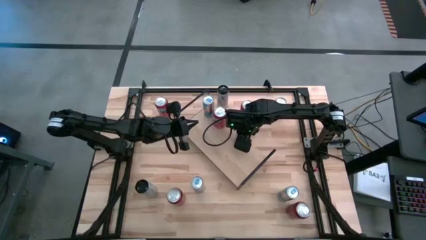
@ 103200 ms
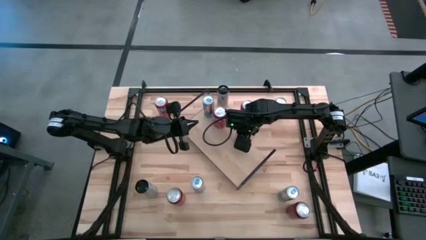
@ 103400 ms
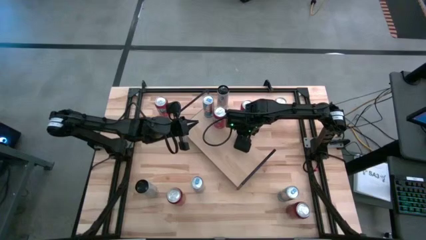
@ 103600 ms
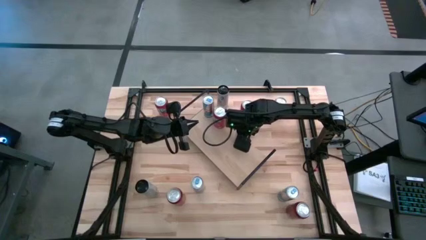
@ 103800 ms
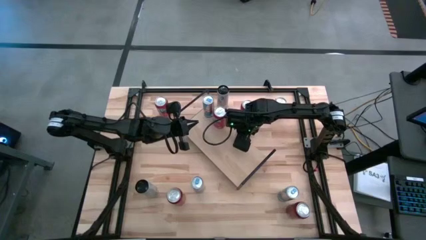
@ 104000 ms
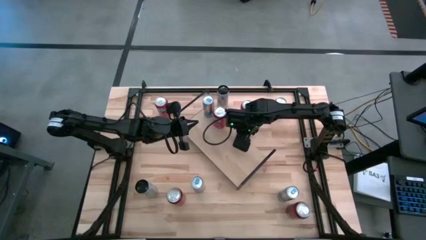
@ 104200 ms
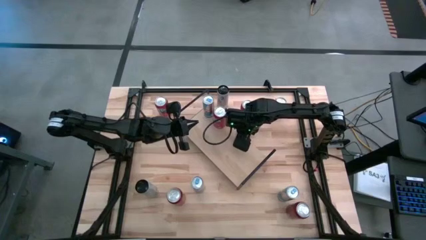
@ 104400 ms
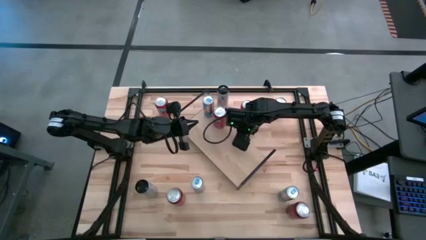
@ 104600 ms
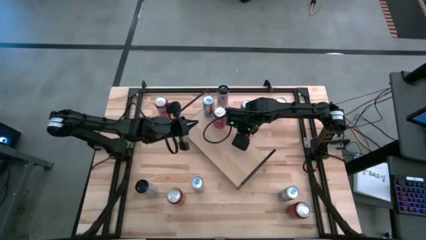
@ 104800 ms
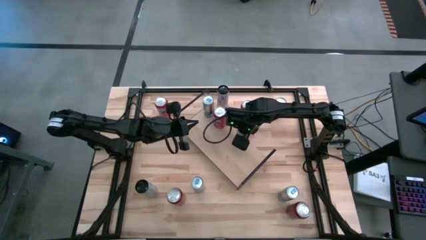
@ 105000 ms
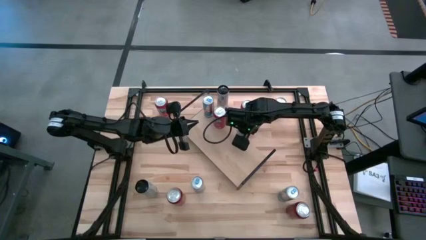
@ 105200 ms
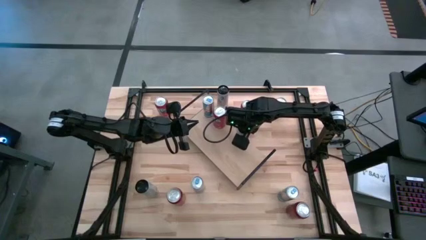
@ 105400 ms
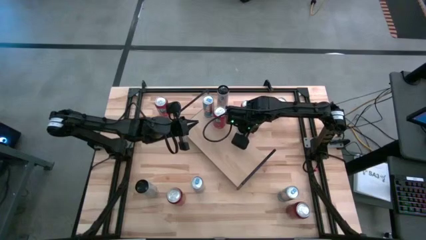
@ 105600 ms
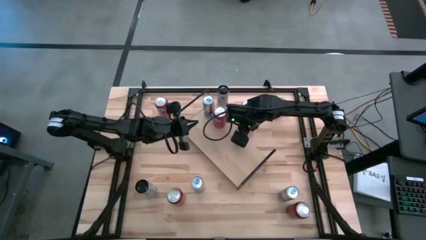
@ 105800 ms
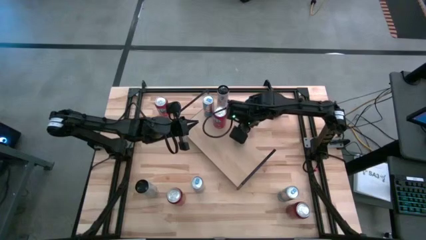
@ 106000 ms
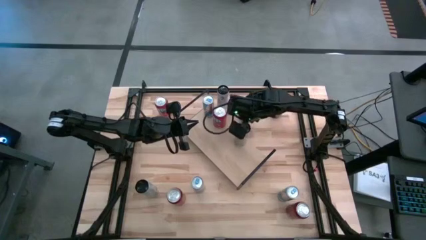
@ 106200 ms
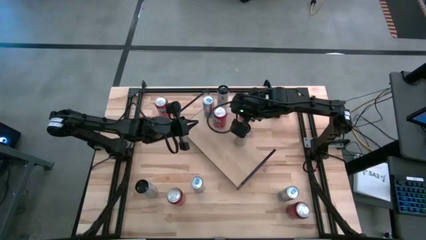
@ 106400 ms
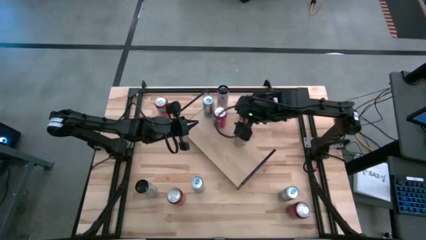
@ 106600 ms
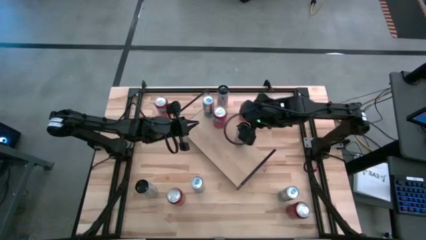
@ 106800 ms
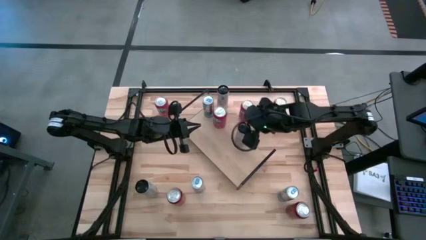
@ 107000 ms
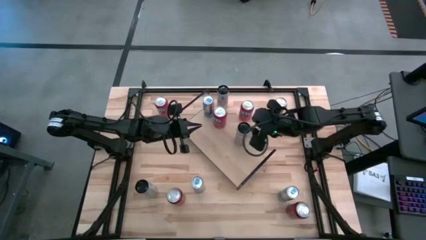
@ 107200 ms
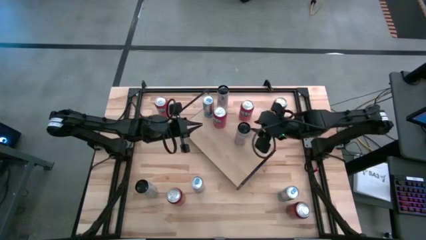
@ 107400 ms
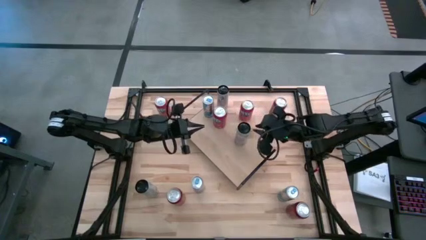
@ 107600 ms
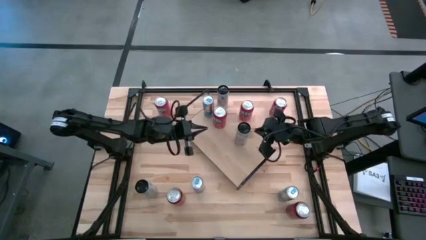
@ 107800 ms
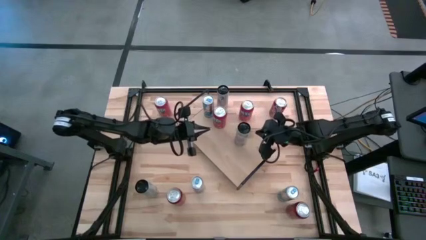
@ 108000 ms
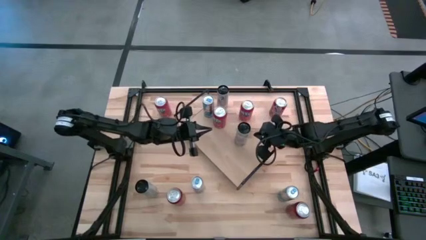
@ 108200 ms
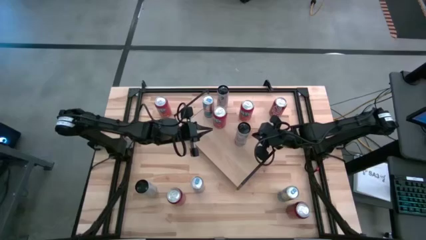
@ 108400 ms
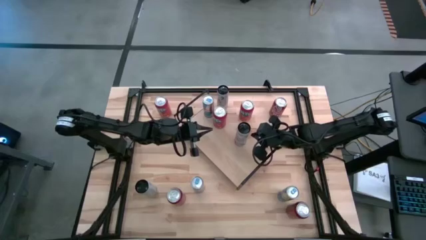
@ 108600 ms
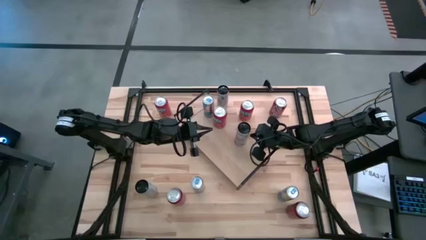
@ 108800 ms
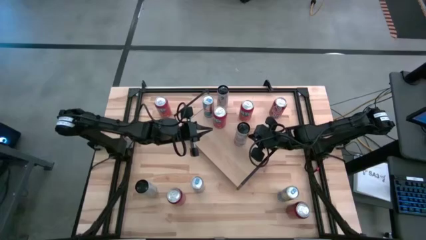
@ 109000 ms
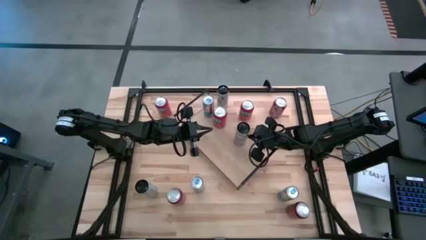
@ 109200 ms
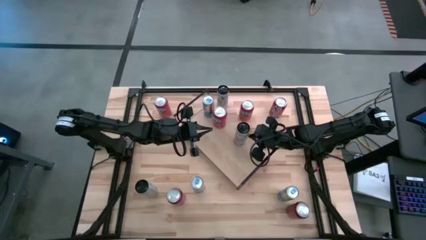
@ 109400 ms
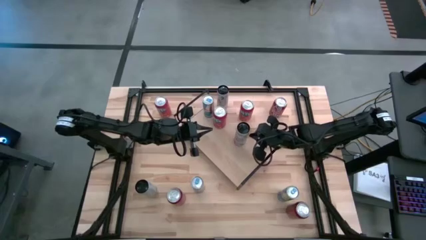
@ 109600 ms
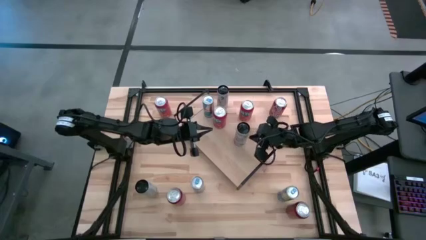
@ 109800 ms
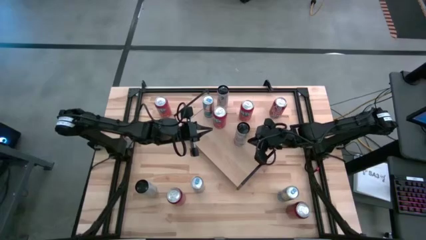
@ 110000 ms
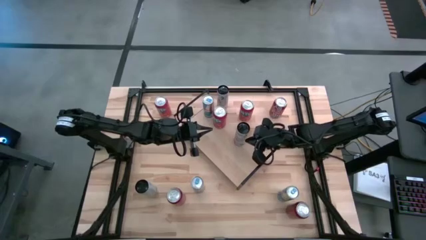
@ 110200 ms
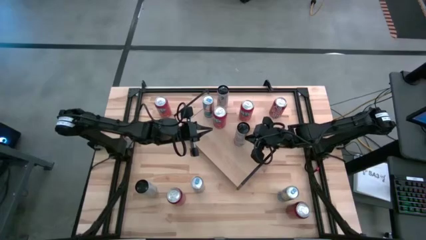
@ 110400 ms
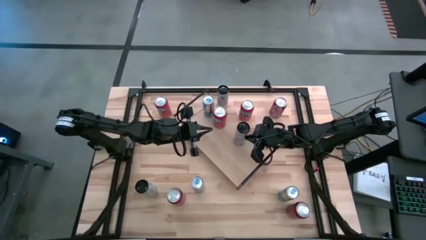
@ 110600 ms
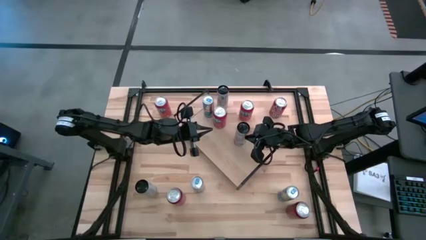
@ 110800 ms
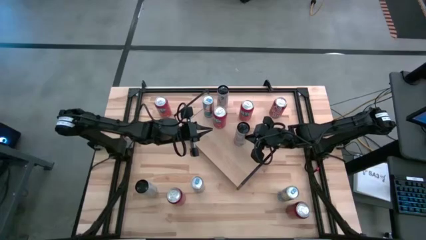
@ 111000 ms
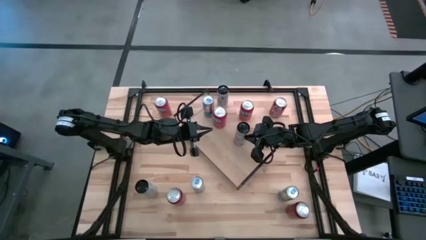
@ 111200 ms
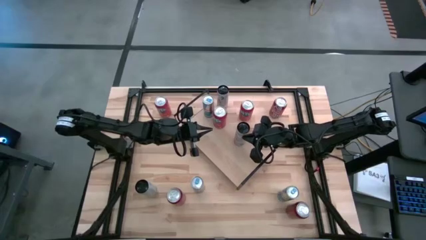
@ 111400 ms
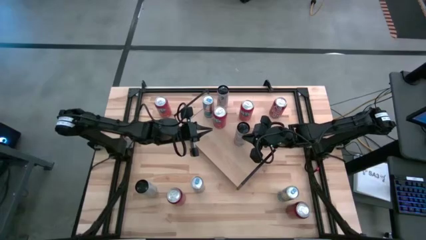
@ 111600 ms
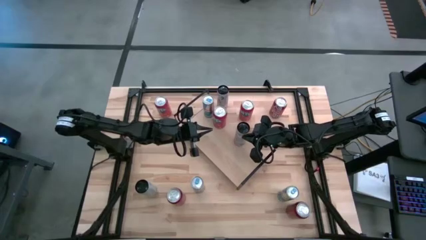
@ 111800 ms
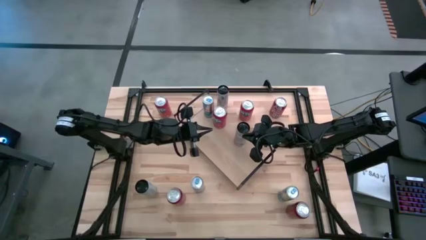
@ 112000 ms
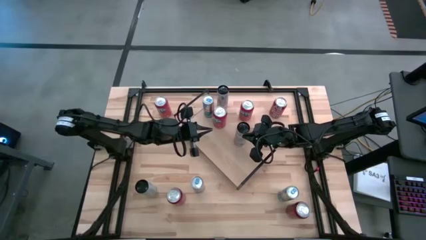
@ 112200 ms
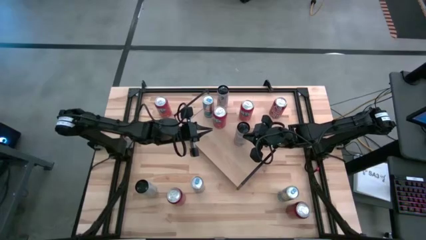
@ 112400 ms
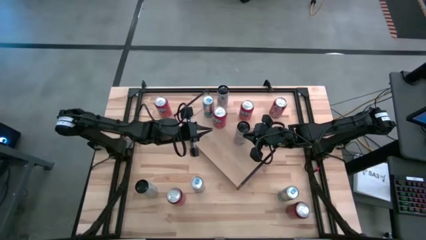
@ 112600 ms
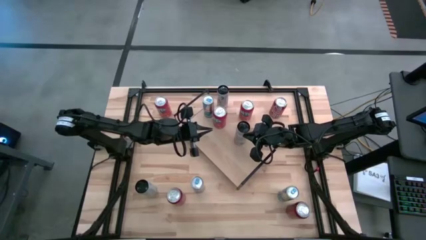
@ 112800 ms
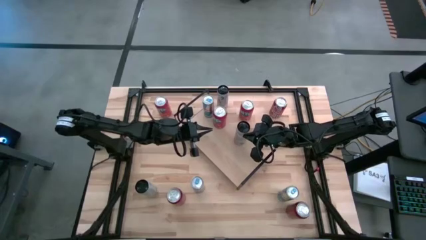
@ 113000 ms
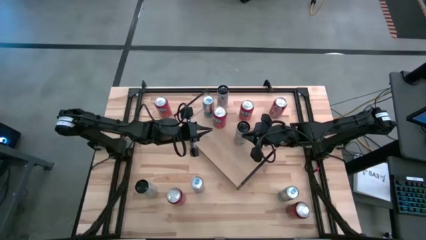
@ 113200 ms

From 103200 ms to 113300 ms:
Task: Place canned beverage on shelf
Put the right pink soda can on the shelf

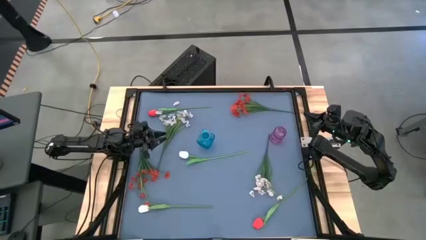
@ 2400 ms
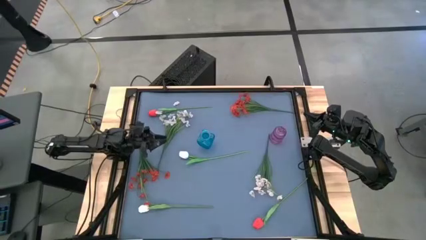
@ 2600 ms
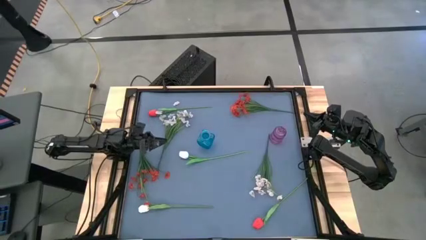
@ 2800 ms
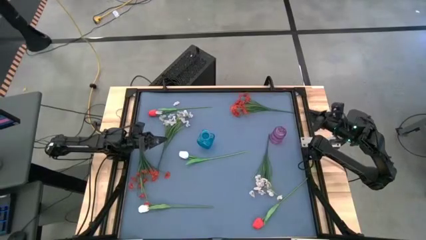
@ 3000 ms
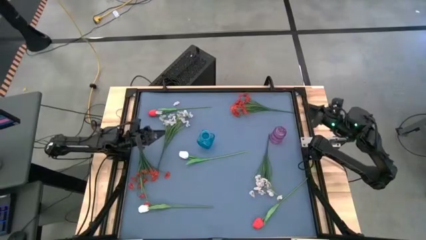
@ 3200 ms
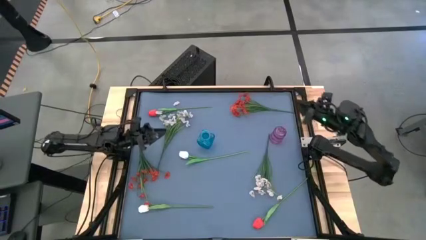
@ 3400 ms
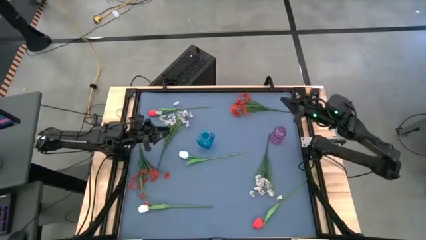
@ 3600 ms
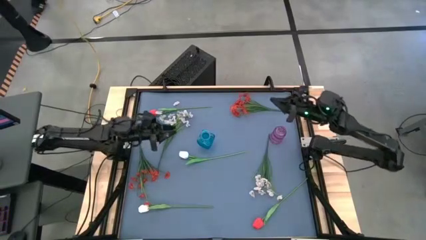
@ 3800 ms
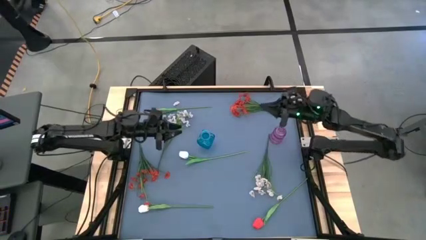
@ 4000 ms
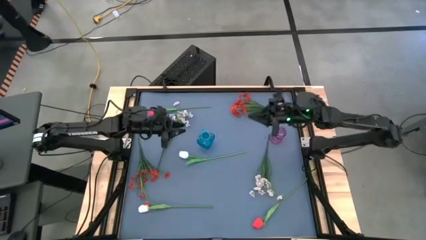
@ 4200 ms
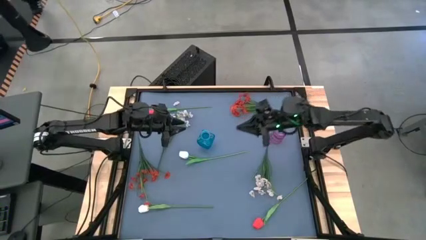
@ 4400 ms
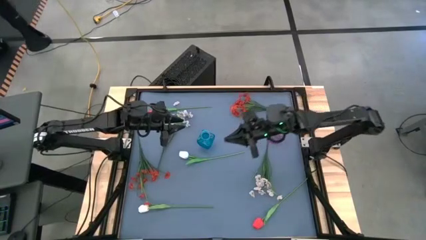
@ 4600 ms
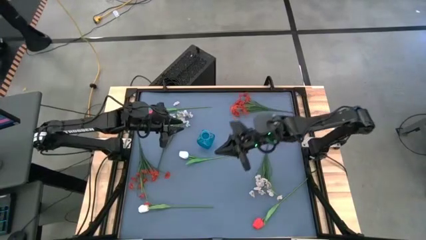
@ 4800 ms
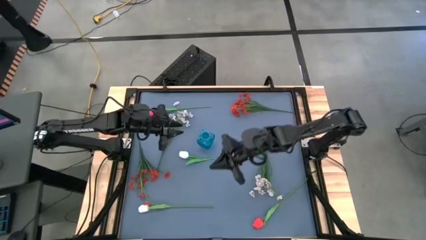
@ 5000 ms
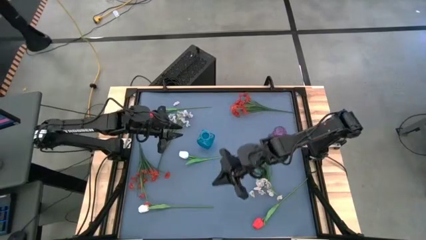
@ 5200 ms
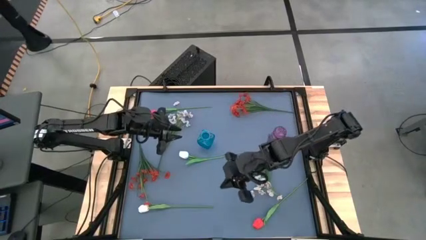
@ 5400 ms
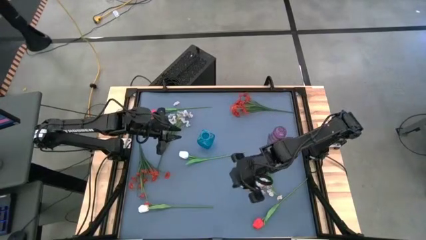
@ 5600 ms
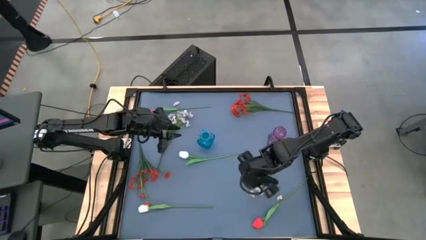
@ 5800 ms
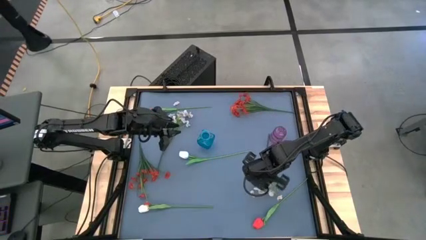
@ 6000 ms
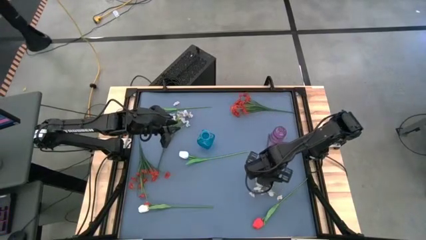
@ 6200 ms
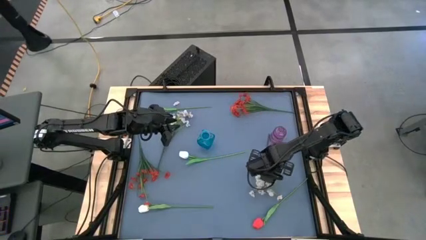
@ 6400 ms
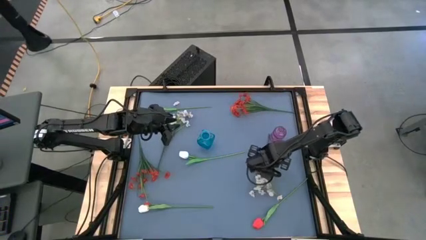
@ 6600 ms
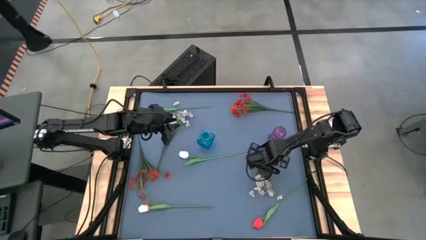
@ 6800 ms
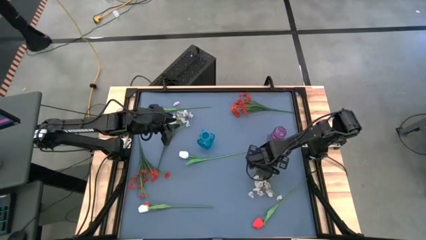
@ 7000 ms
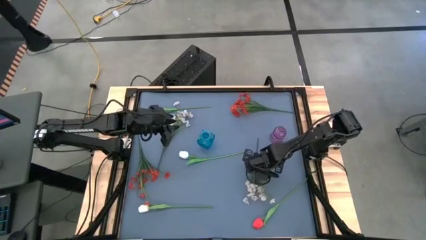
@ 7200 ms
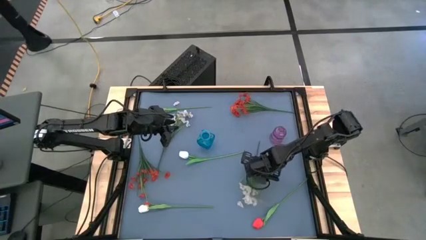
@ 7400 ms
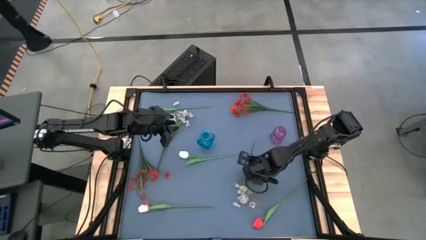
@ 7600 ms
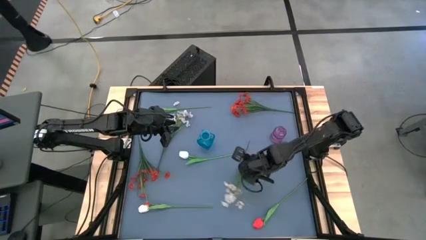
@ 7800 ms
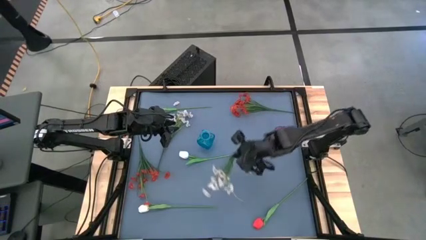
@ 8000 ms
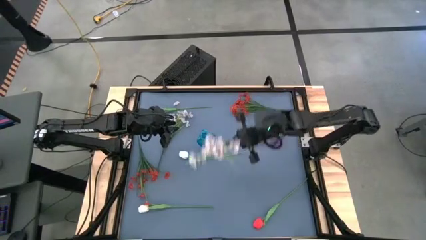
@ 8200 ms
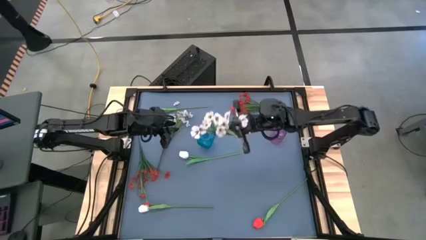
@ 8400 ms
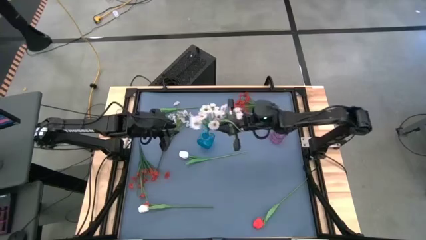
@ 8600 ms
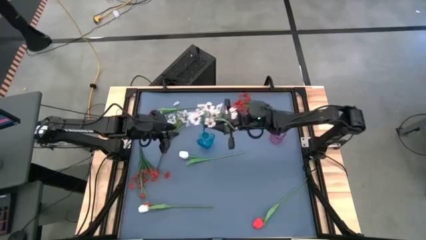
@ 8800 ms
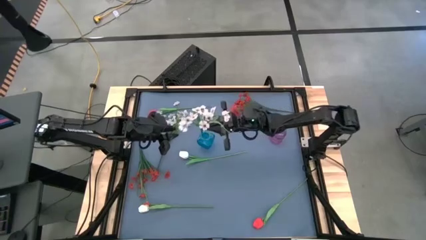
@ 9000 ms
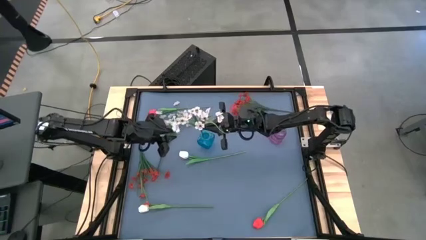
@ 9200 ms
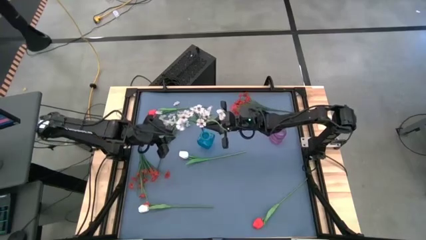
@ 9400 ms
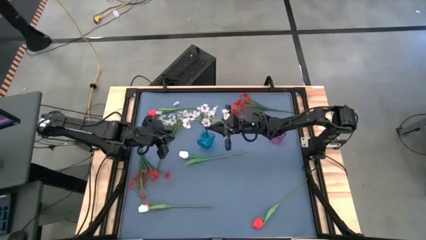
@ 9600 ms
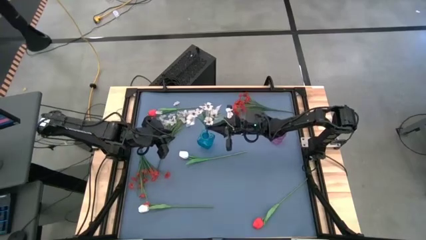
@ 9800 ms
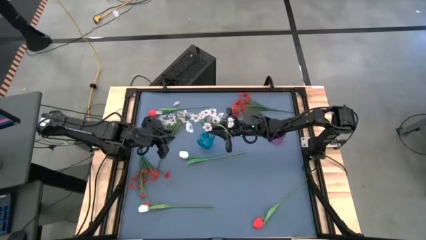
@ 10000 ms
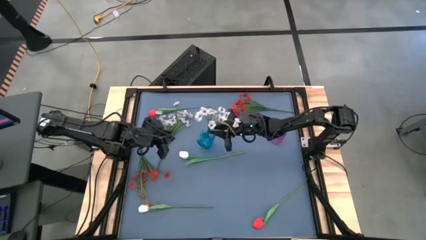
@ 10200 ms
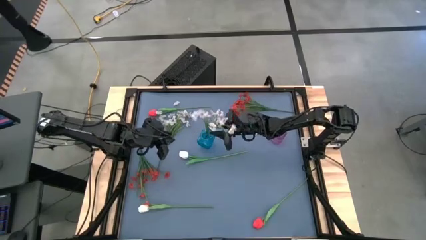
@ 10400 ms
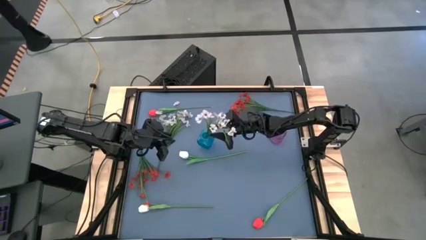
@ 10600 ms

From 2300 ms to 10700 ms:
Task: Sort flowers into vase by color
Put the right white flowers into the blue vase
